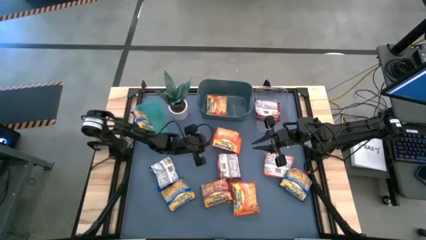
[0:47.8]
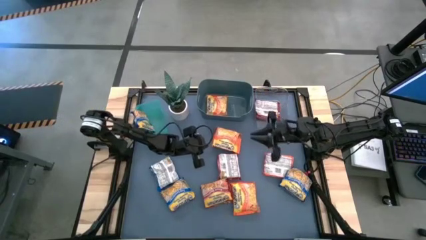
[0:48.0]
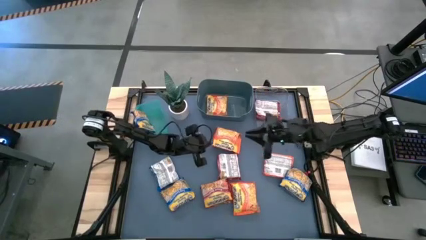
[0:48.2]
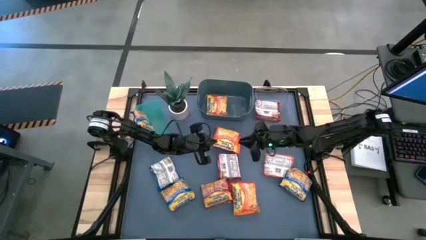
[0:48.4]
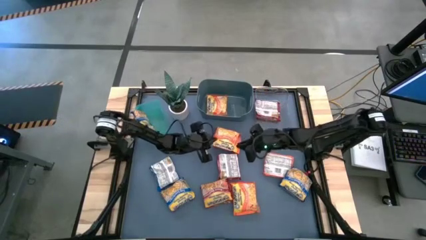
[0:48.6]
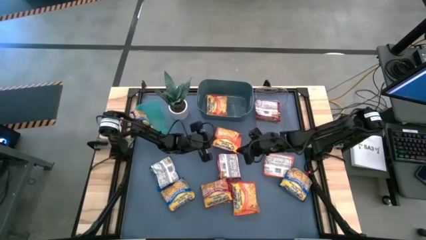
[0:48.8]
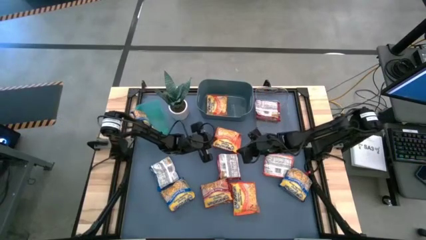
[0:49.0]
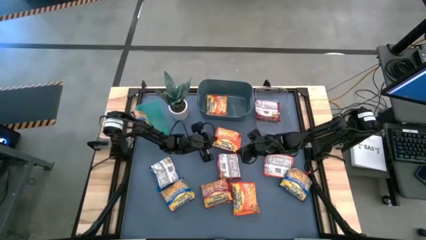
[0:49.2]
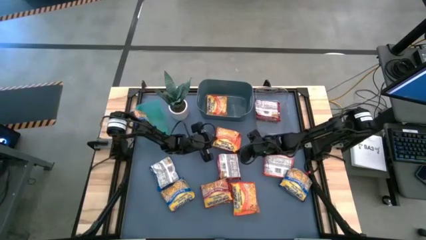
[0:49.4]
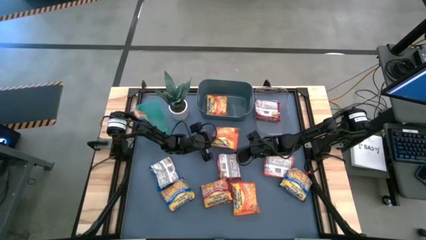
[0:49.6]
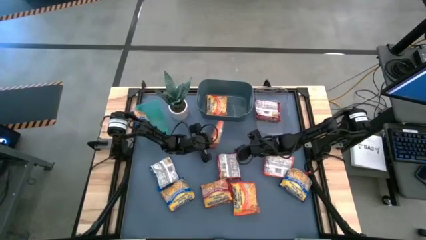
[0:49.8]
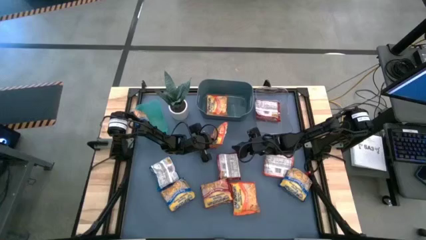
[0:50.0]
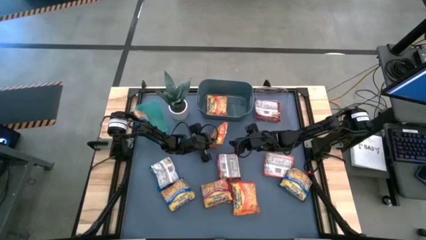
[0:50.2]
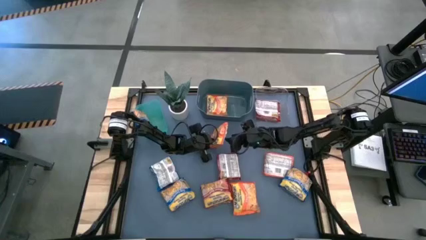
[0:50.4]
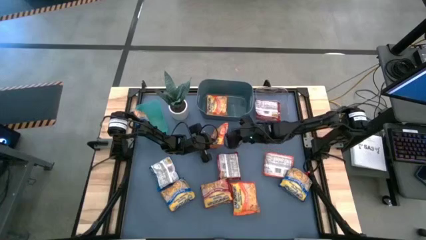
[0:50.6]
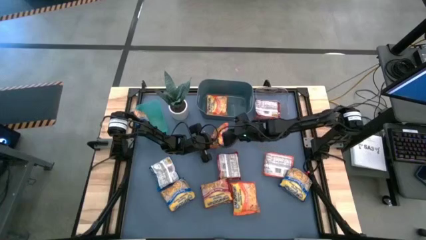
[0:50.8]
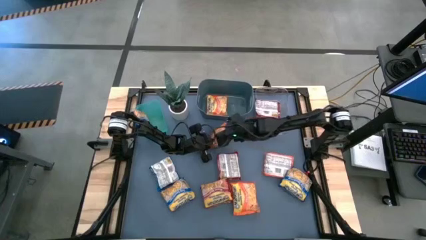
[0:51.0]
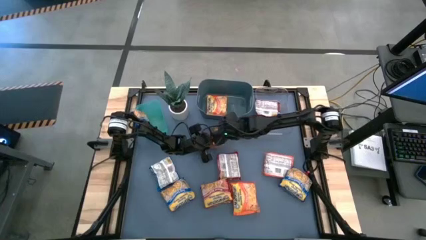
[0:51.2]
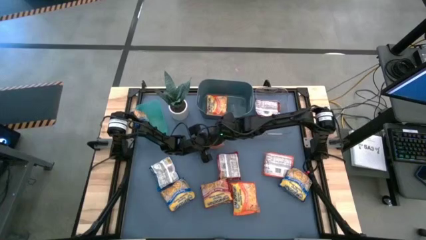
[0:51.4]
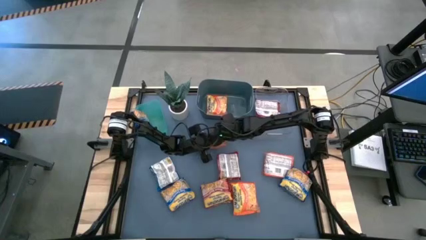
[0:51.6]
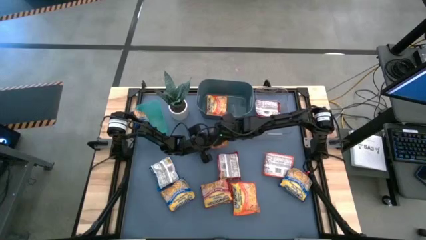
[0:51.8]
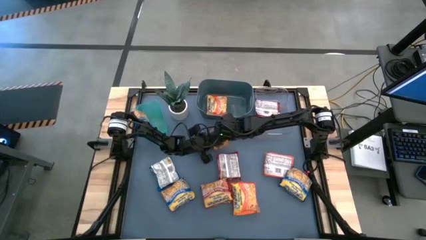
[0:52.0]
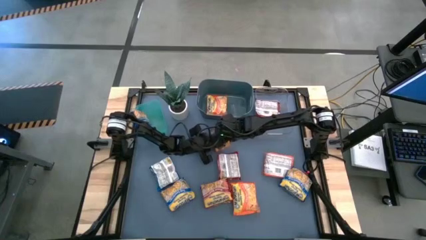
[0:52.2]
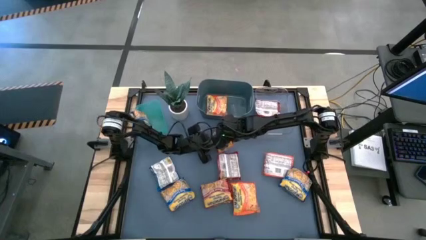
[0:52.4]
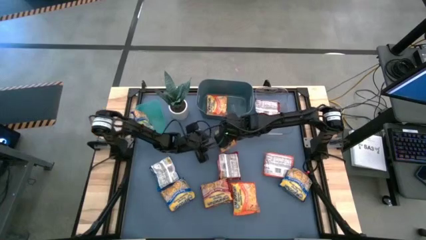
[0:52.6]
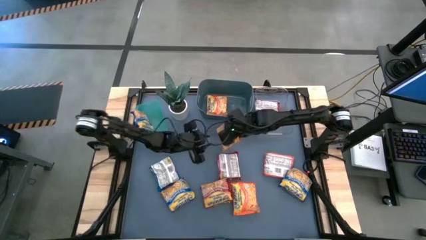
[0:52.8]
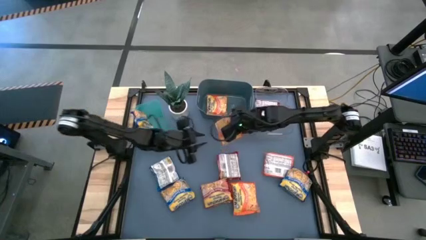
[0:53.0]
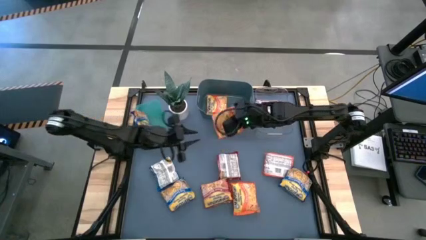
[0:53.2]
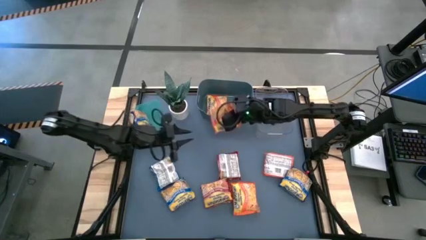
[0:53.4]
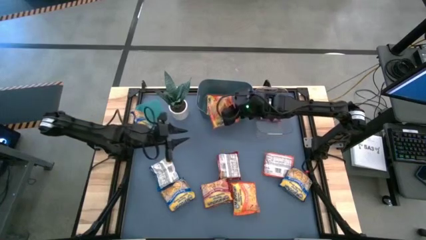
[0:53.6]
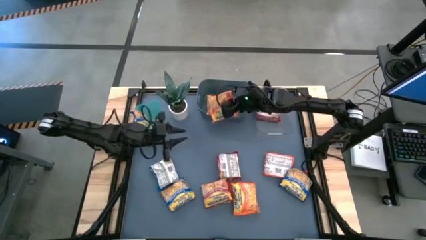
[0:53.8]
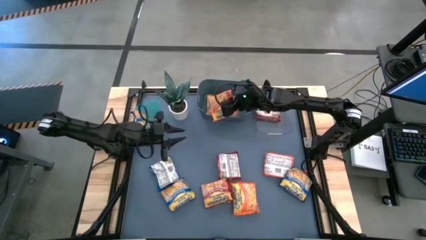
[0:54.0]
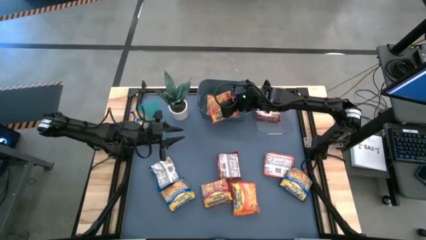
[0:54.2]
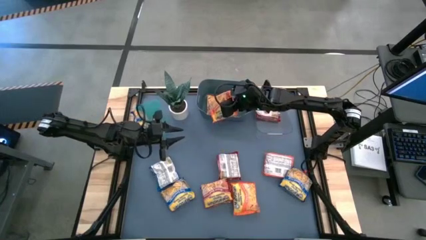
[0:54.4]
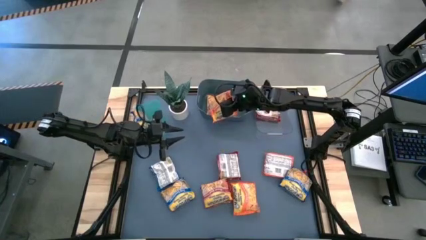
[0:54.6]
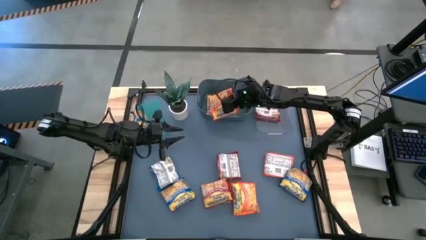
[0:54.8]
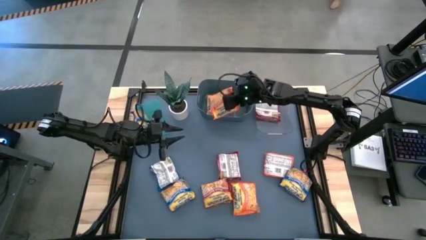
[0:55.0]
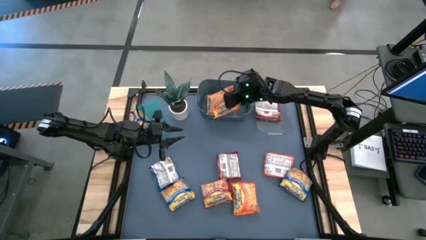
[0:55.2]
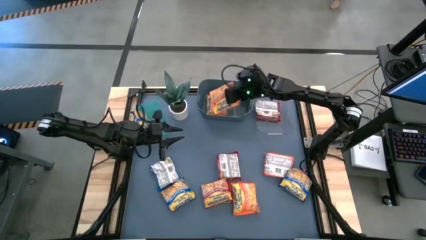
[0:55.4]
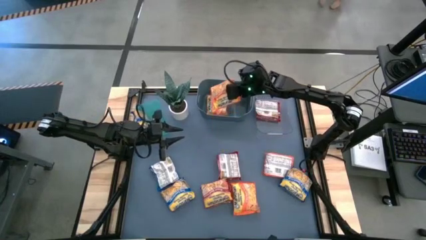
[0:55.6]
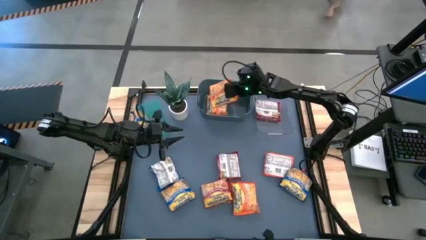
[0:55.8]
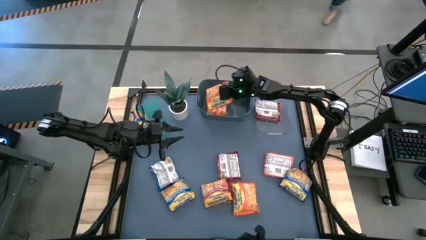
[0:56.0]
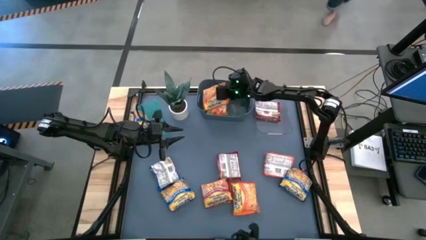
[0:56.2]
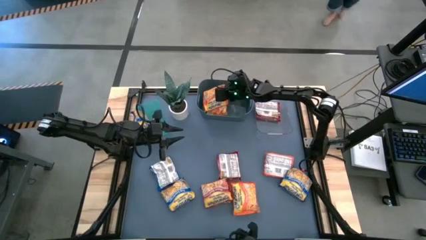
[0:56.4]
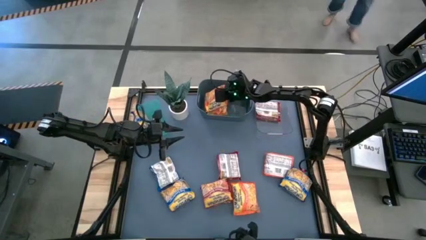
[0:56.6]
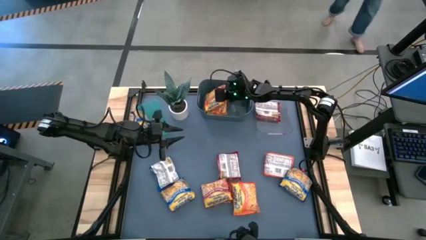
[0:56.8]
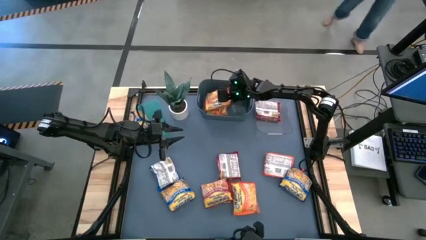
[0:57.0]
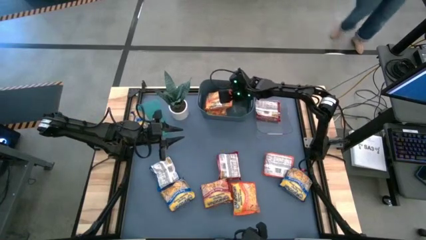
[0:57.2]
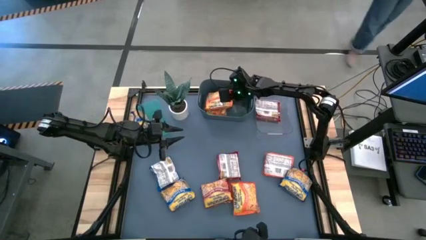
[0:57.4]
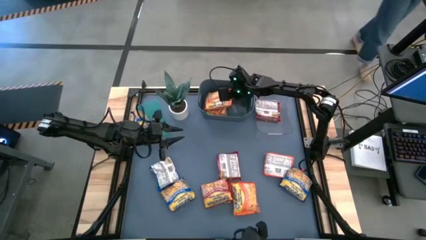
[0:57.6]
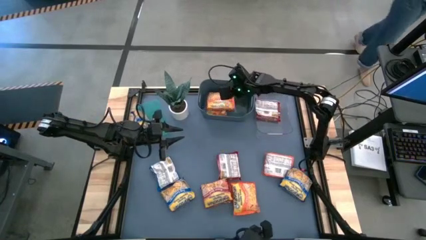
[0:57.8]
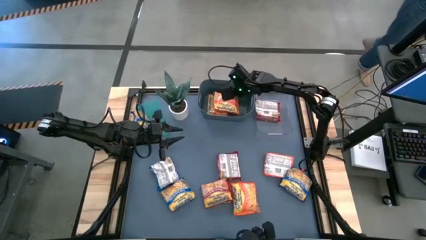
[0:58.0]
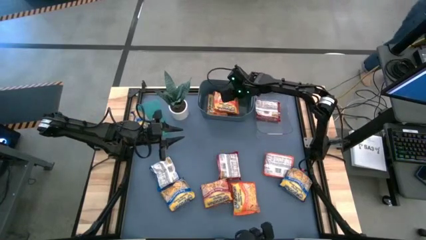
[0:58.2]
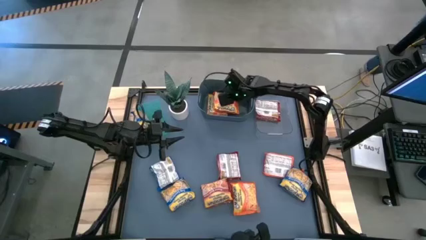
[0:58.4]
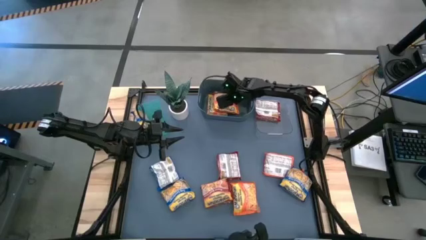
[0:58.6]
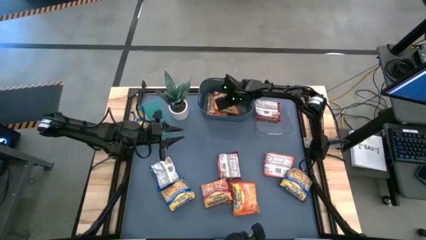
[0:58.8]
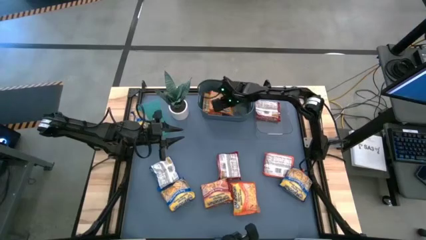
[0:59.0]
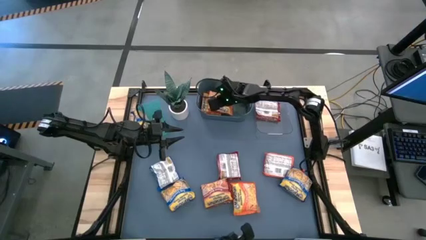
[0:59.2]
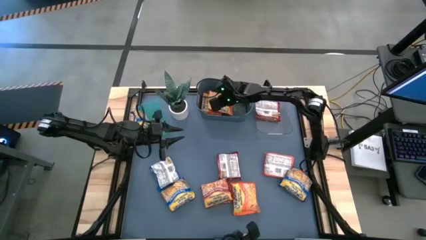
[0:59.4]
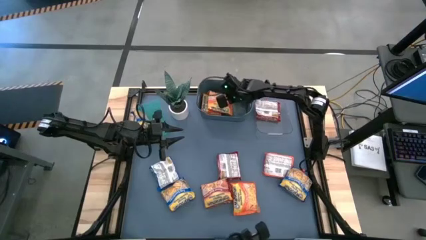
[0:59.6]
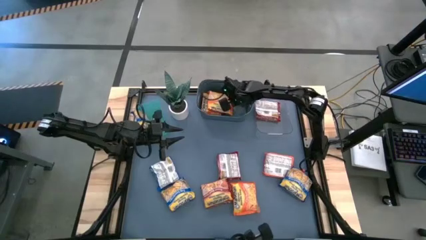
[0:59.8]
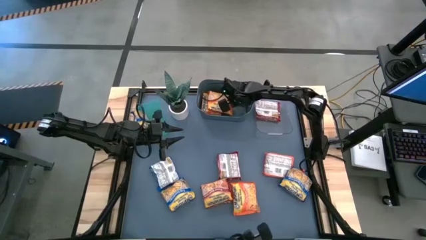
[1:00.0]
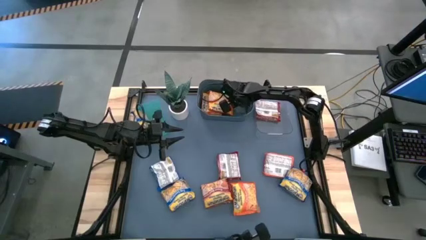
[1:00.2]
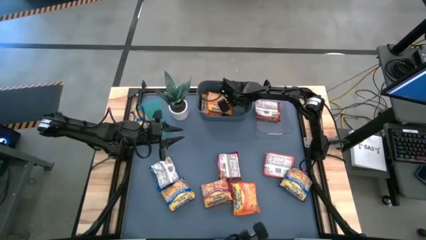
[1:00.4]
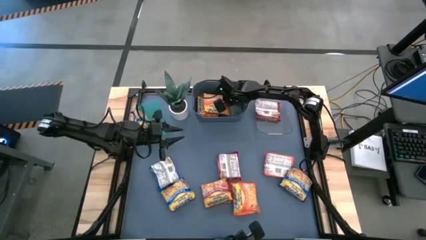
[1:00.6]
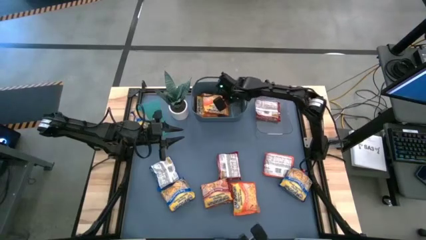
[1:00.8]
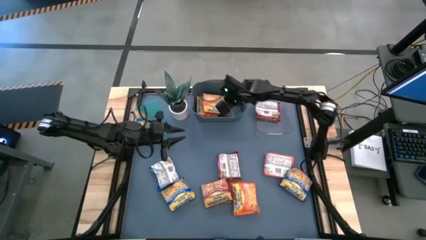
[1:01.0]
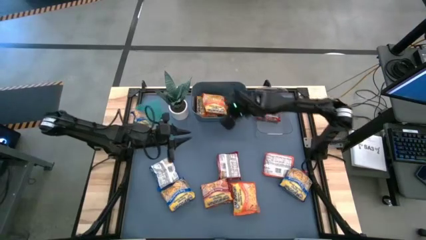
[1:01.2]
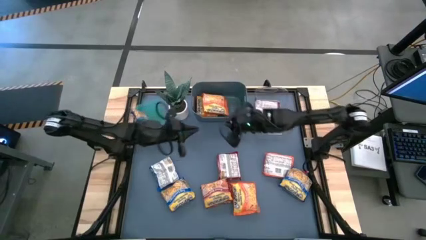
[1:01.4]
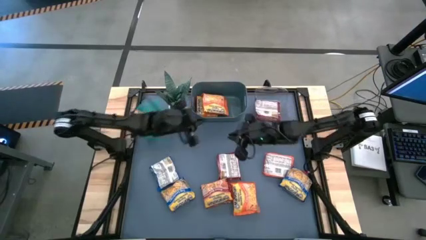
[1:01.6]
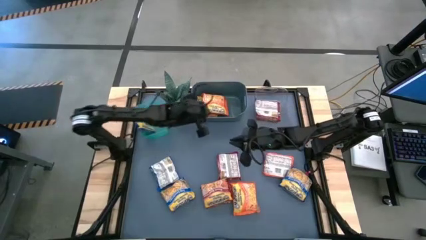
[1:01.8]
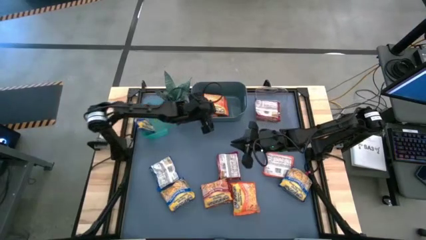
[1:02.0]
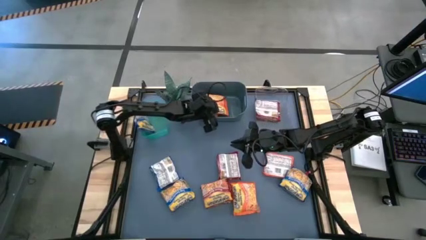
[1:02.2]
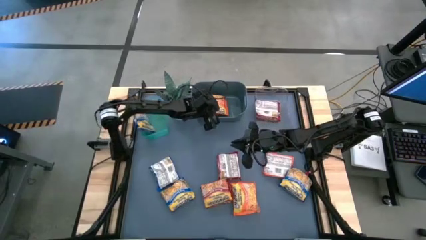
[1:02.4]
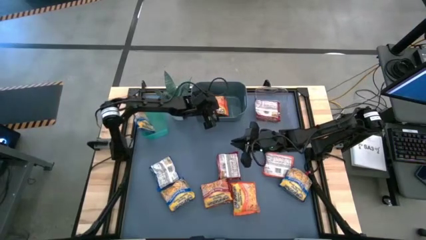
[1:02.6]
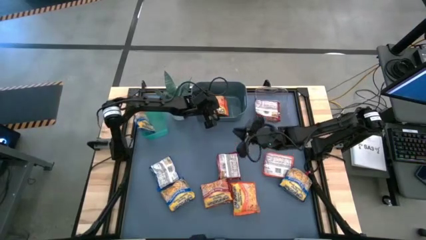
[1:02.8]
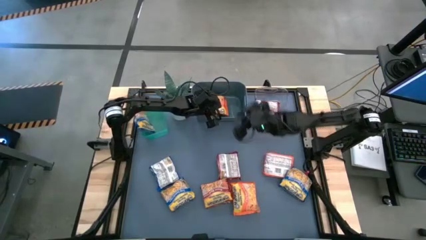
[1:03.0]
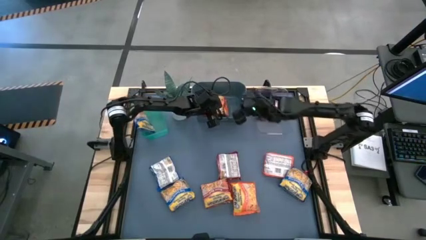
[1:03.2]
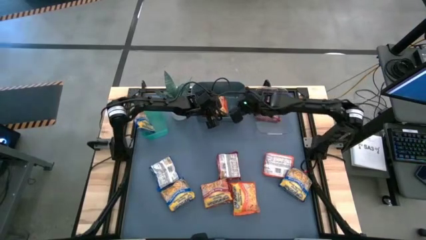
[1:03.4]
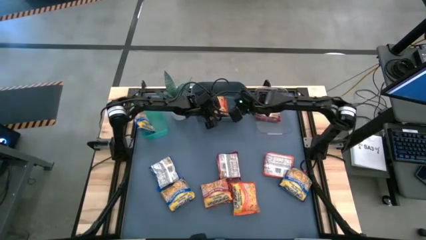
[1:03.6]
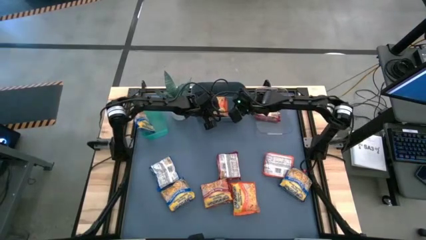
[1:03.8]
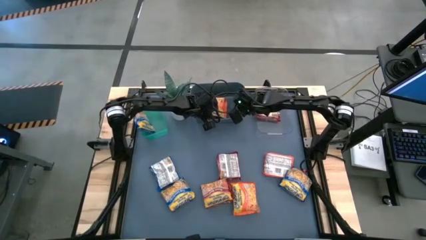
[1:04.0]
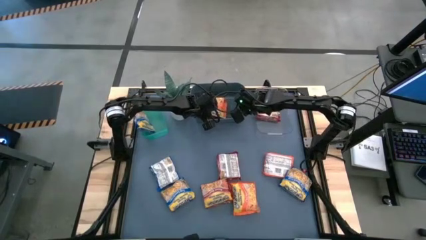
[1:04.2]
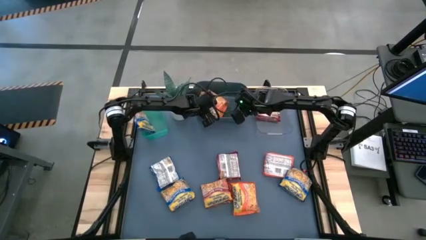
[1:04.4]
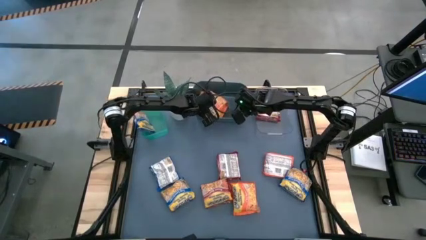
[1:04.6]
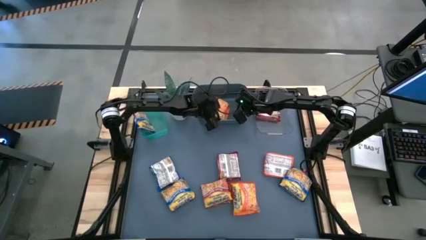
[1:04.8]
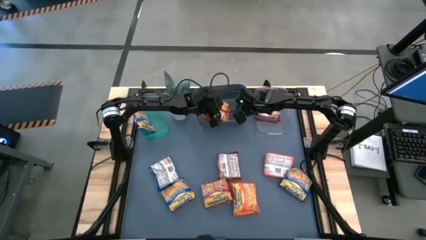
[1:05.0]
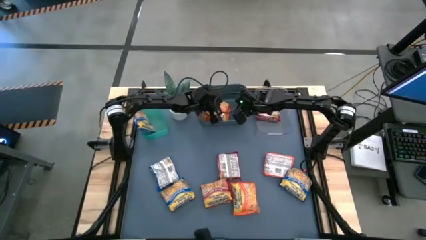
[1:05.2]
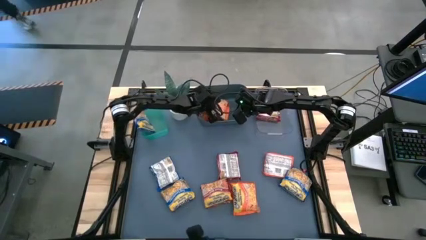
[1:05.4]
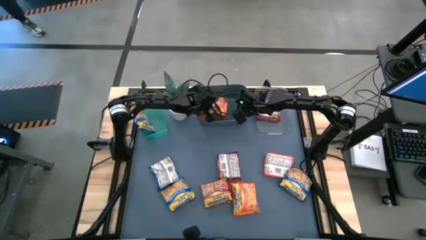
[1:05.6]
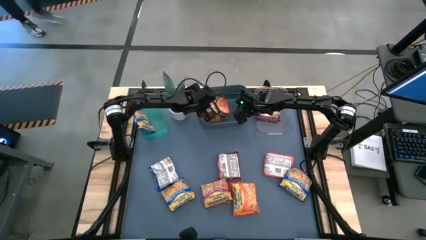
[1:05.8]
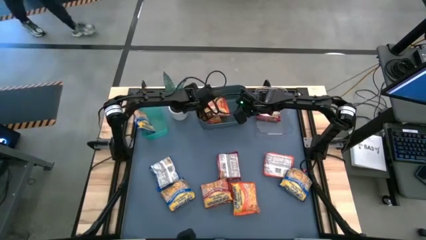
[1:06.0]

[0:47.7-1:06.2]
Task: Sort Maruchan noodles
Put the orange noodle pack into the blue bin
